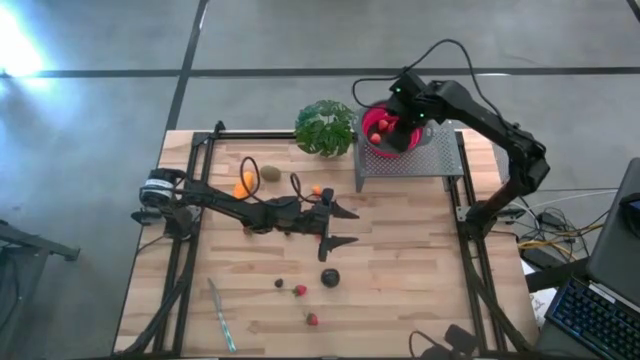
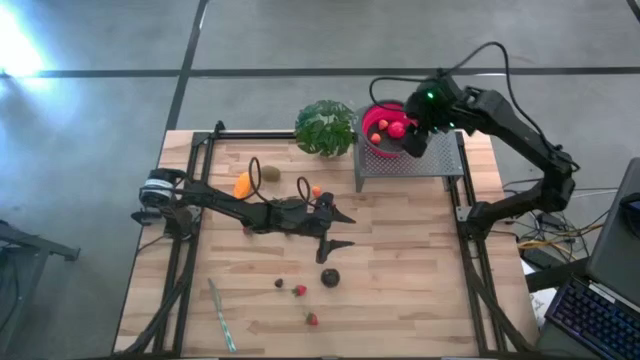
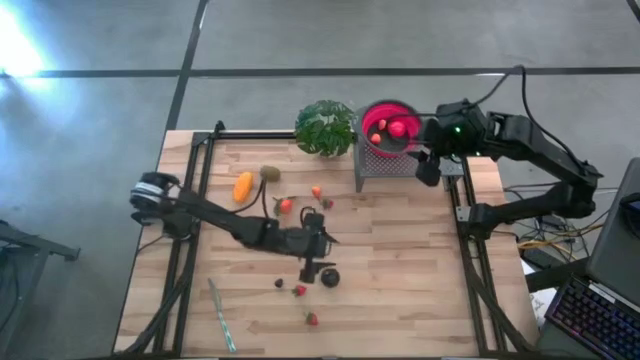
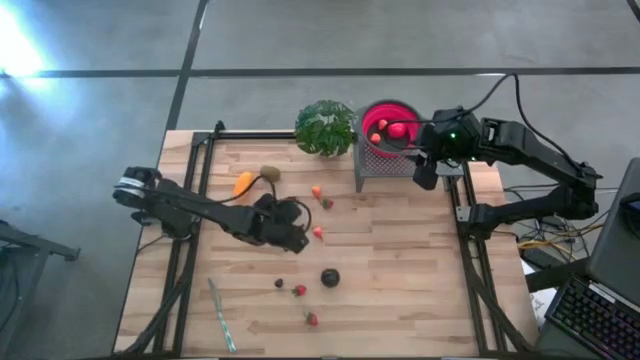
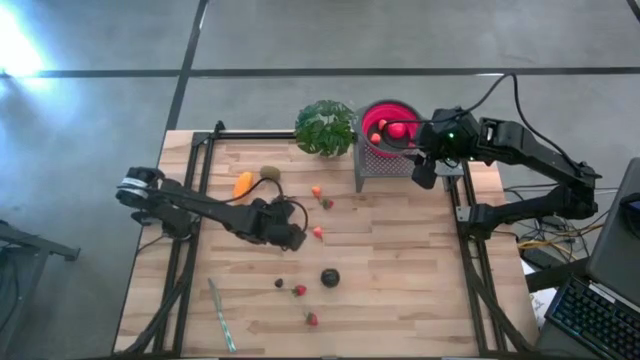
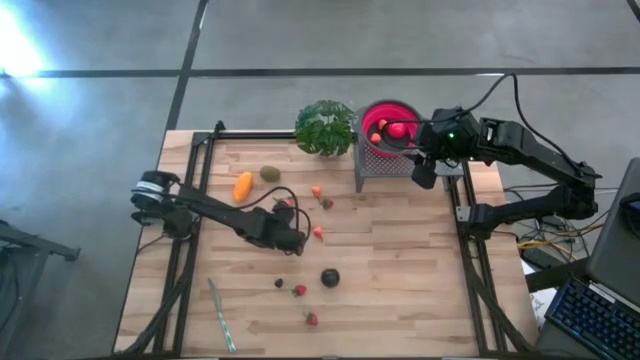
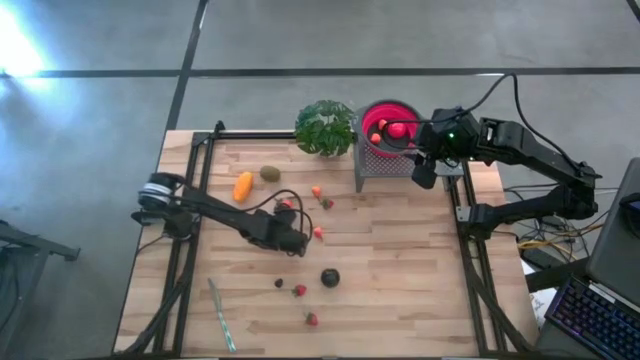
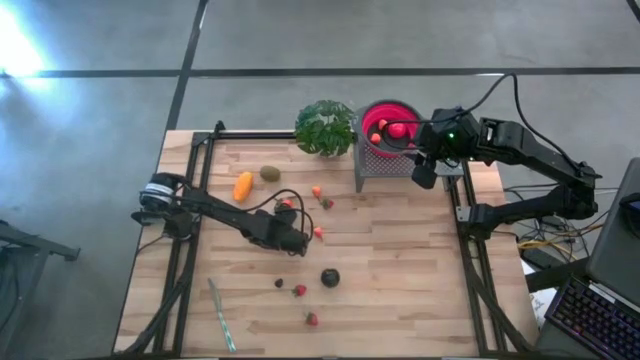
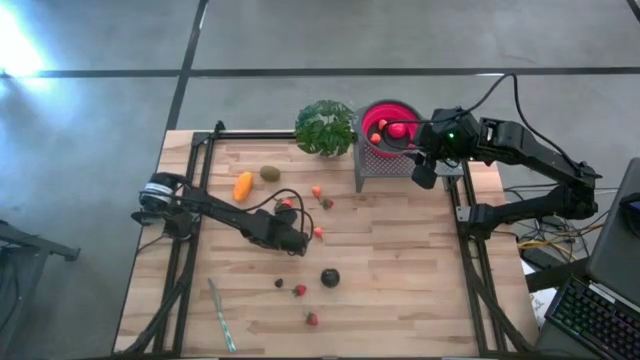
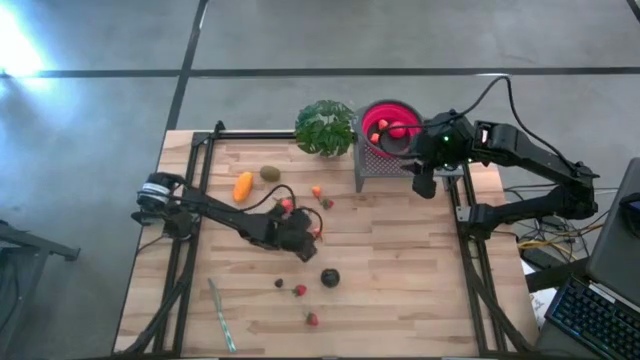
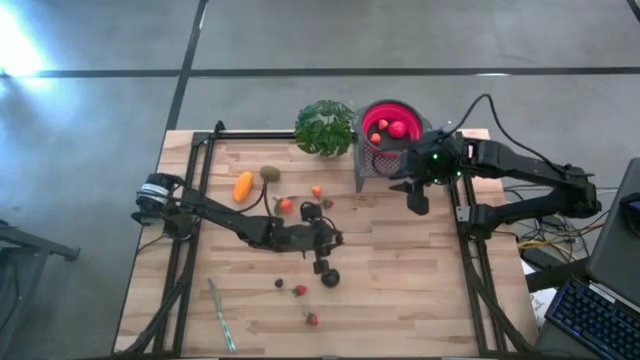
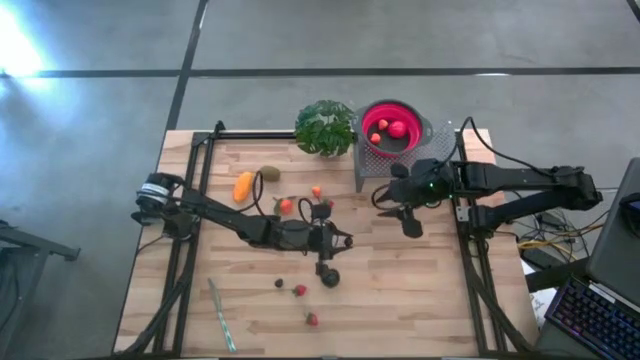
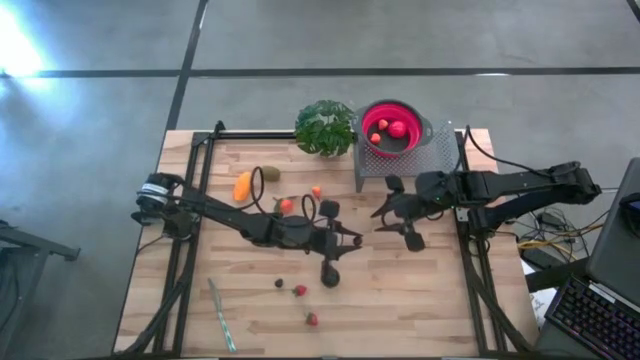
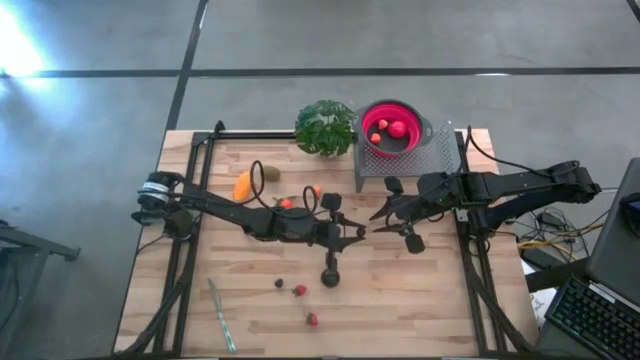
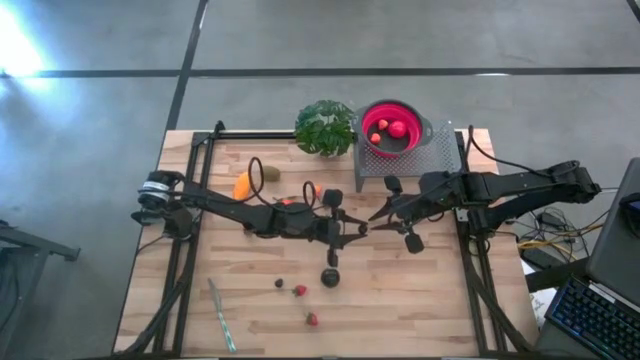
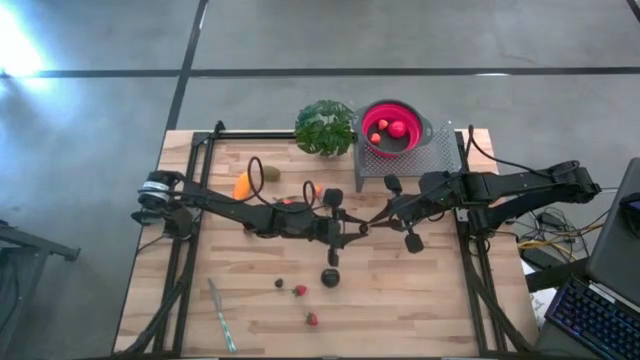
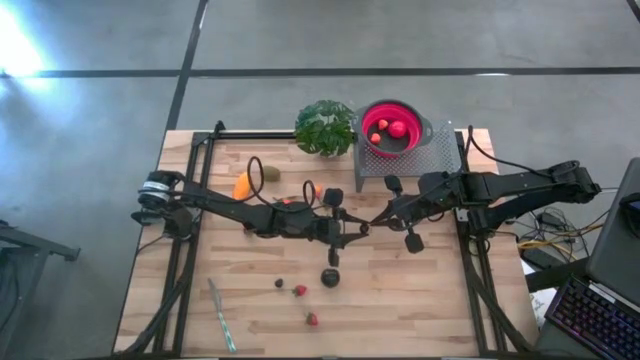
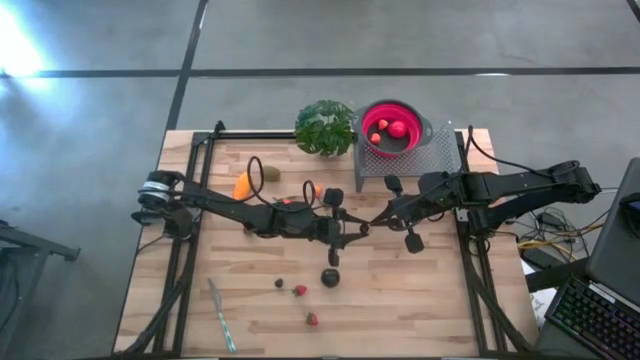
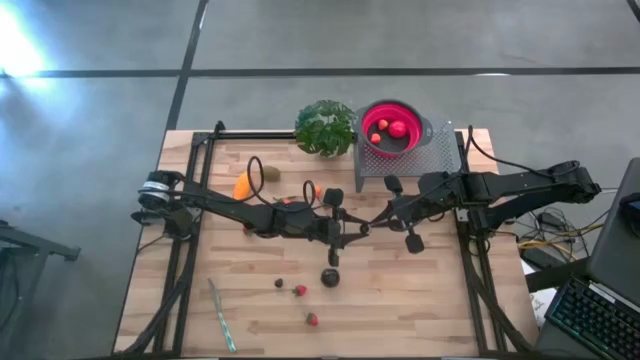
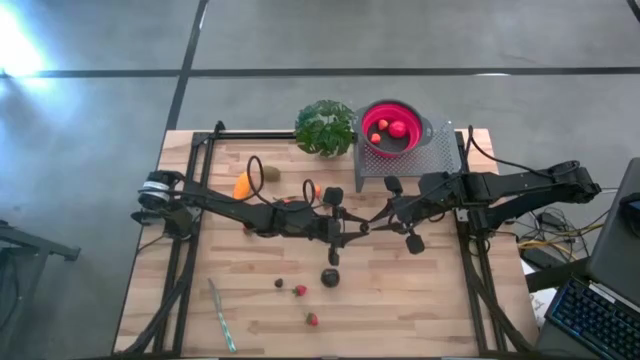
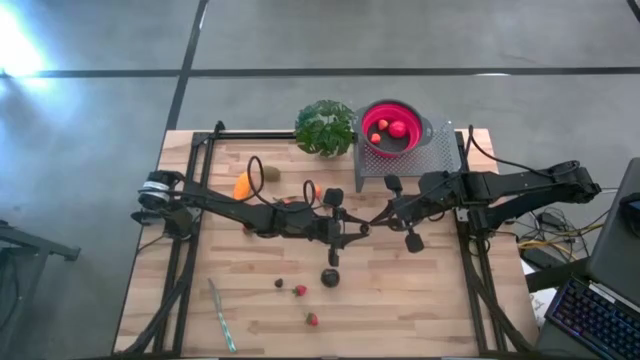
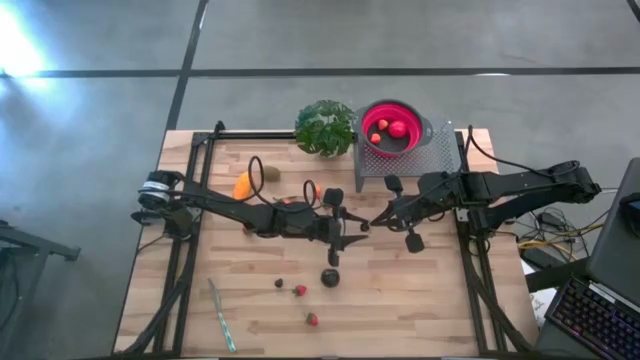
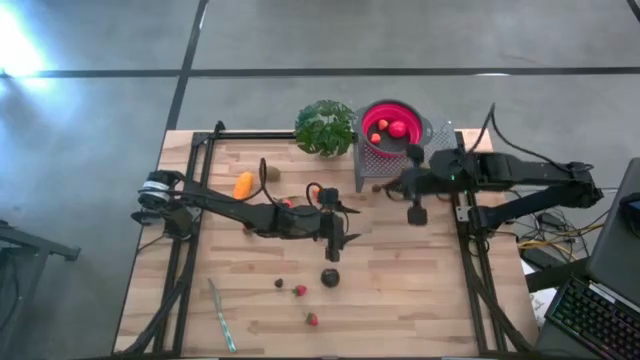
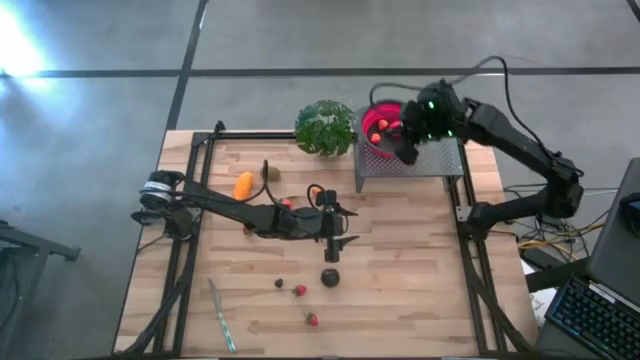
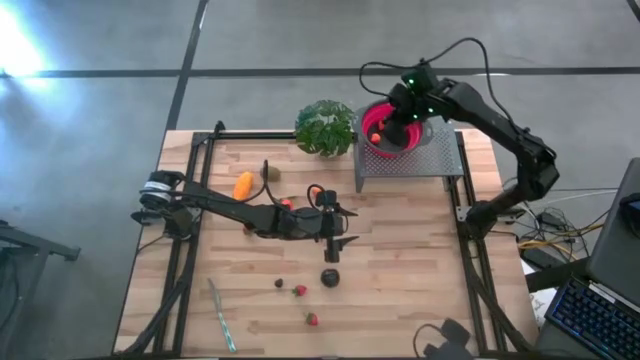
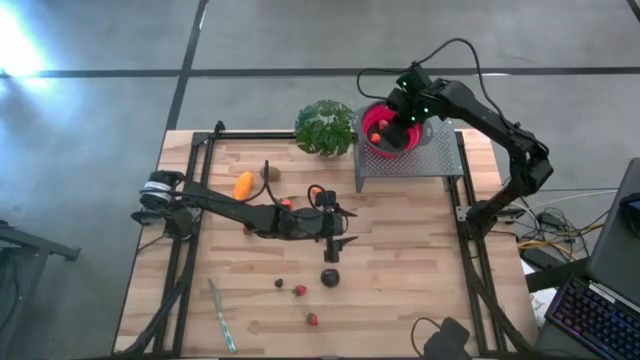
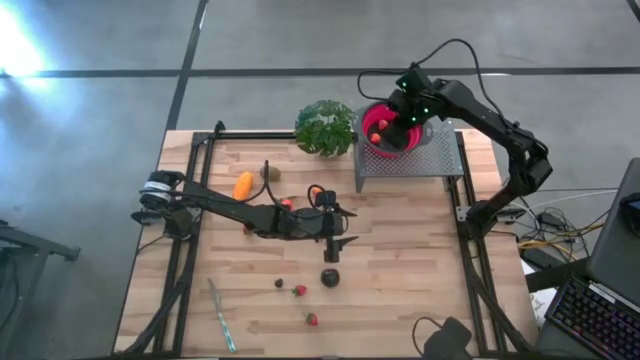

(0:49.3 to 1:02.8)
Task: Pick & Place Fruit
Put the plum into the red strainer bowl on the shelf

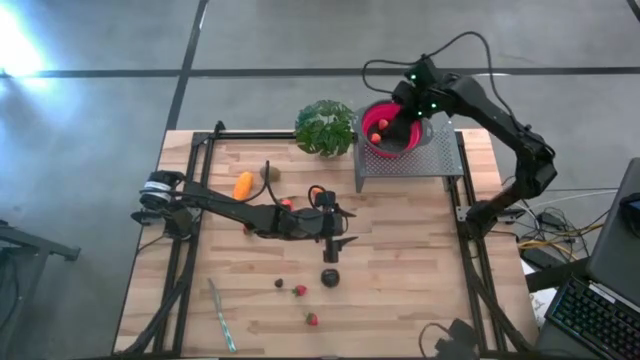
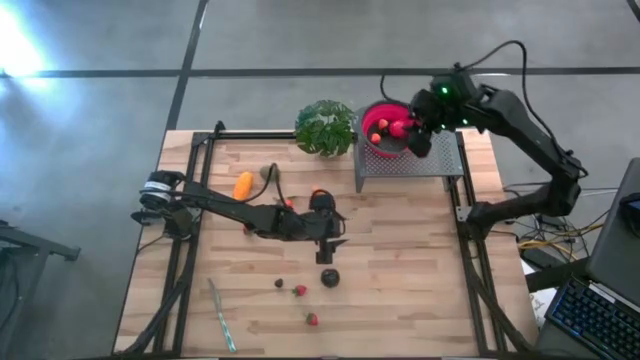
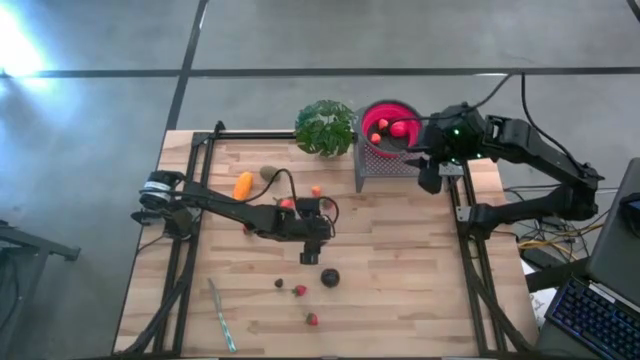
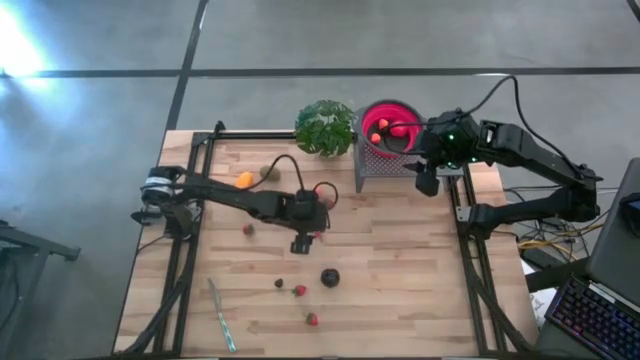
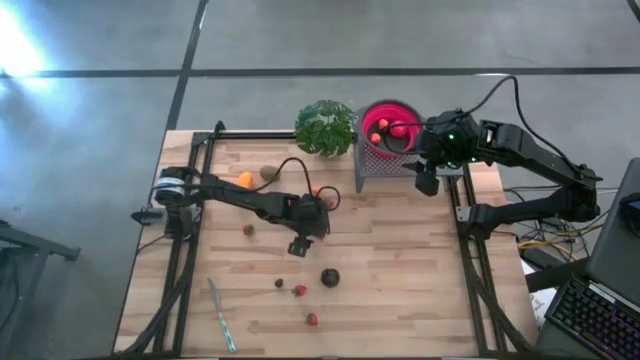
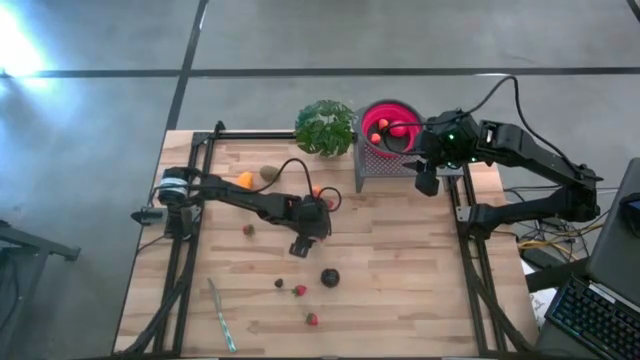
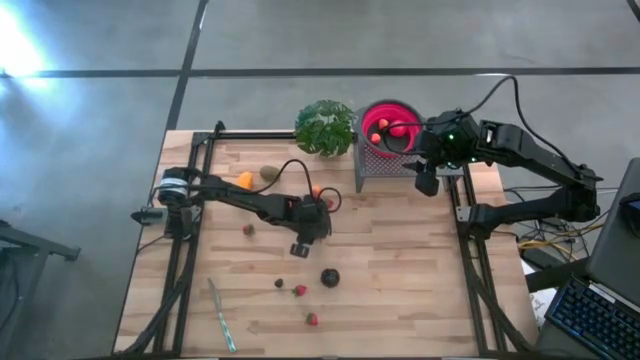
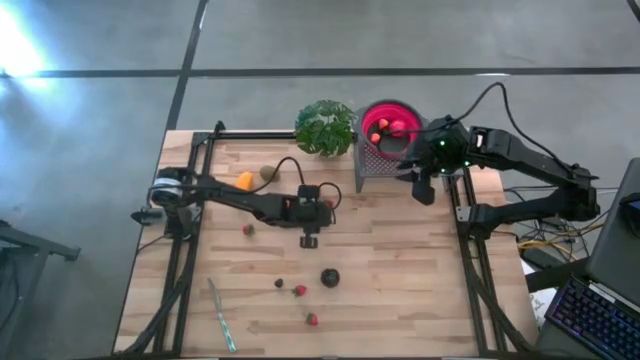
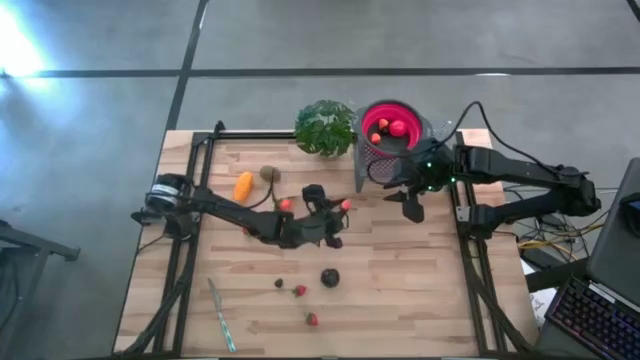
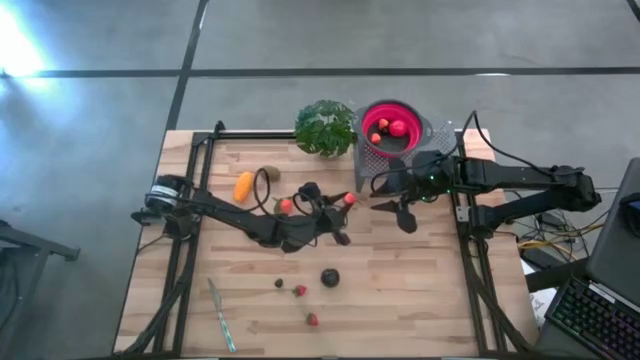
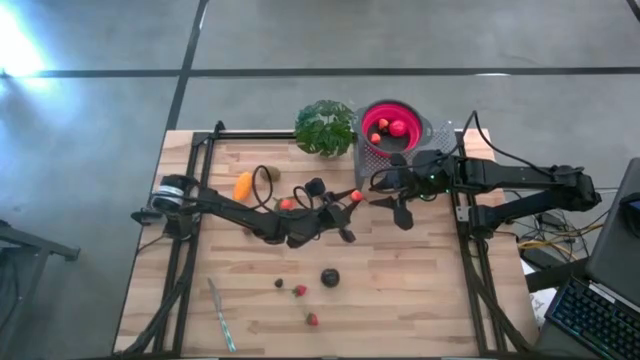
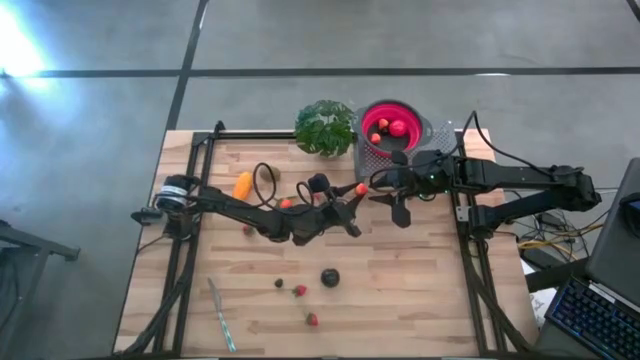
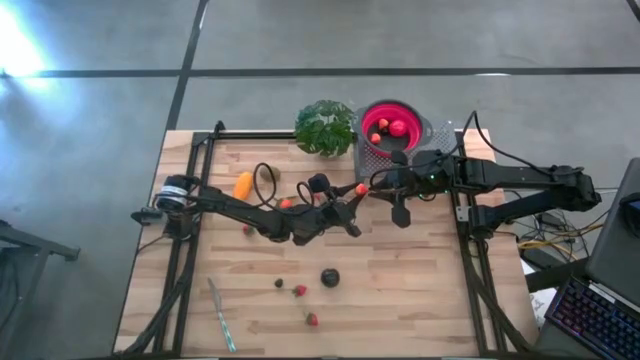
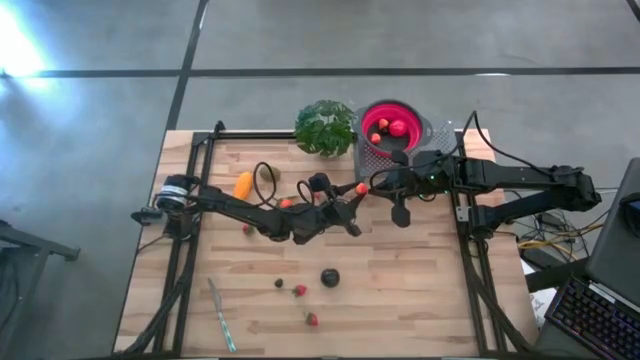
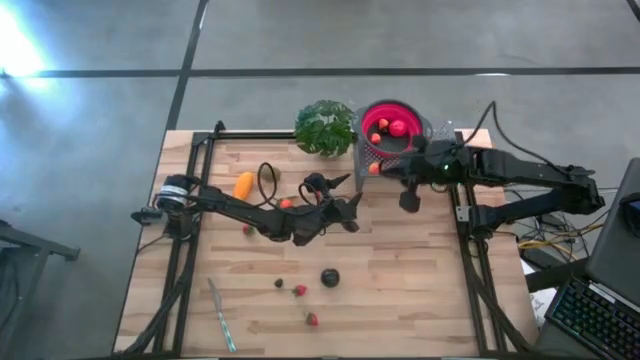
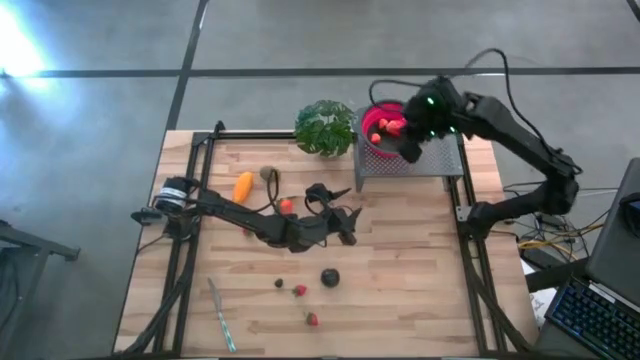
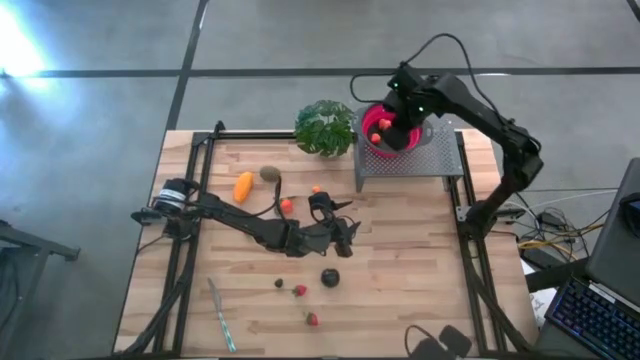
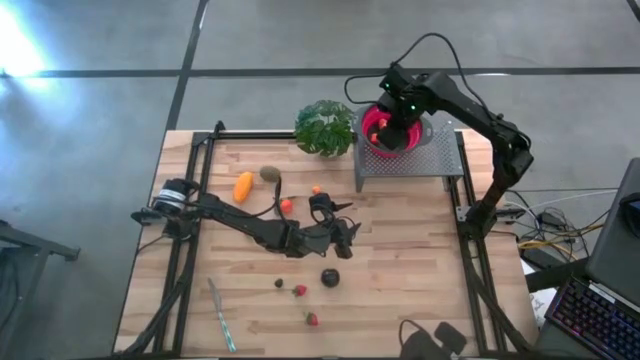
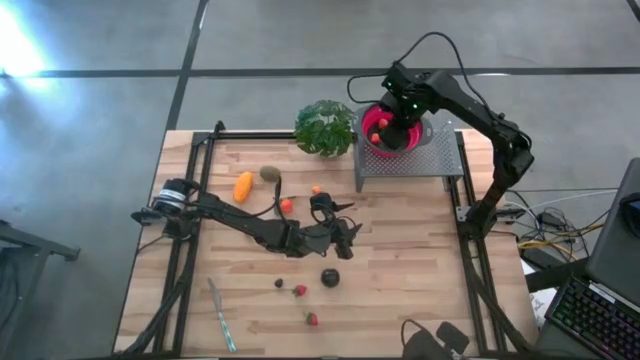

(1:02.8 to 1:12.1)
Put the pear into the red strainer bowl on the shelf
